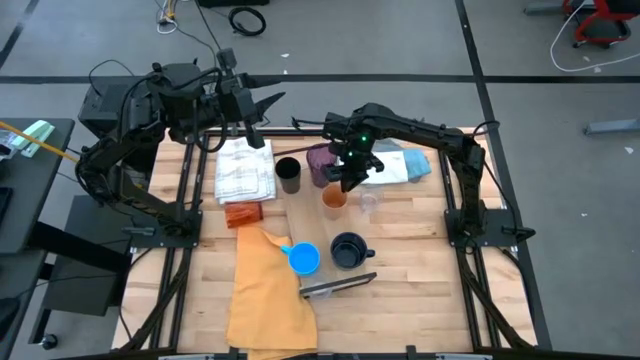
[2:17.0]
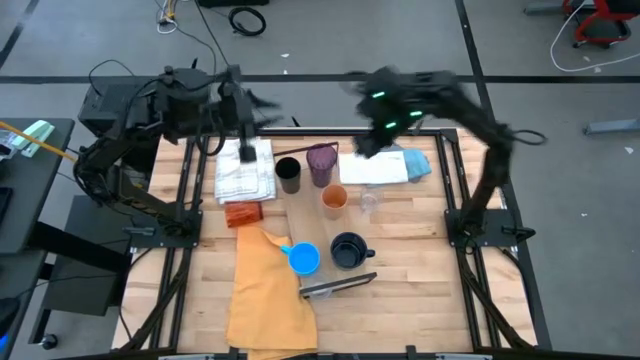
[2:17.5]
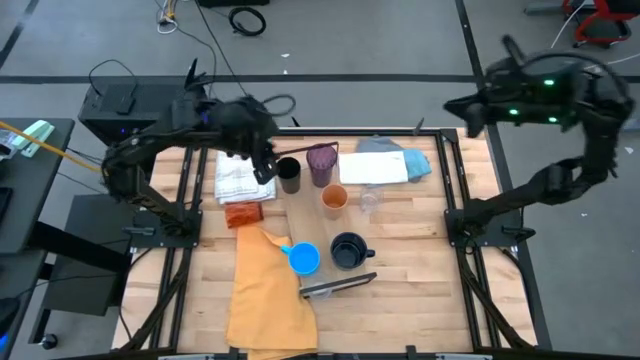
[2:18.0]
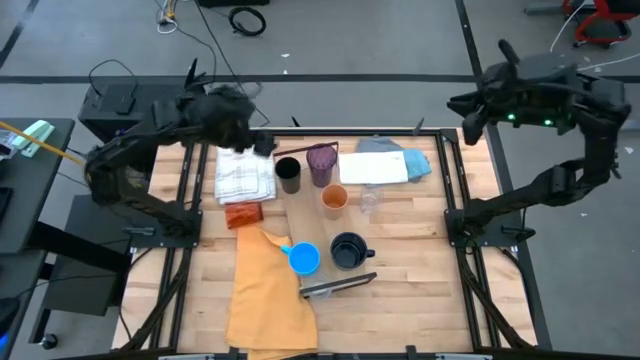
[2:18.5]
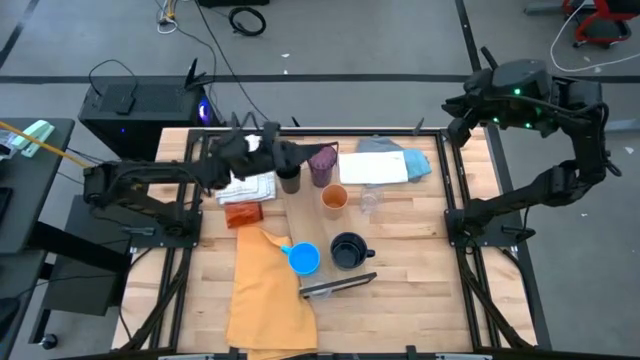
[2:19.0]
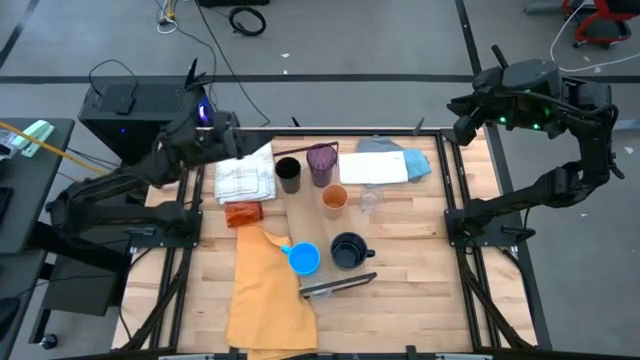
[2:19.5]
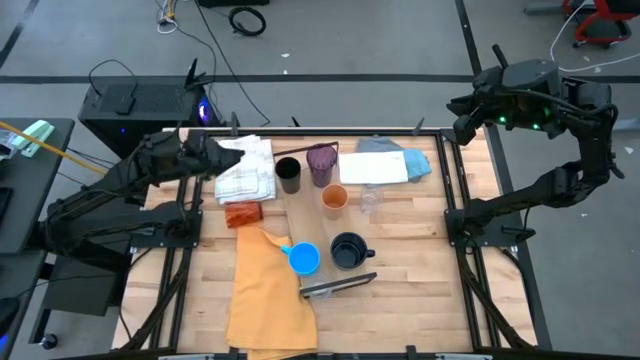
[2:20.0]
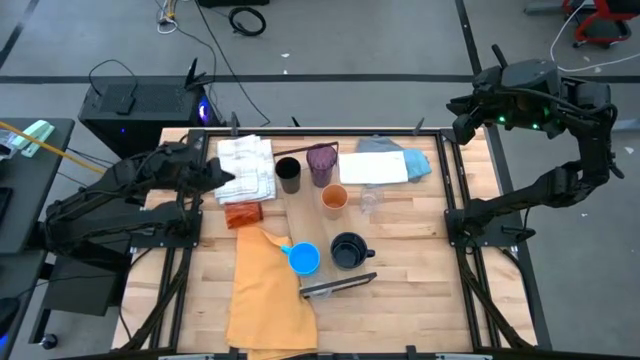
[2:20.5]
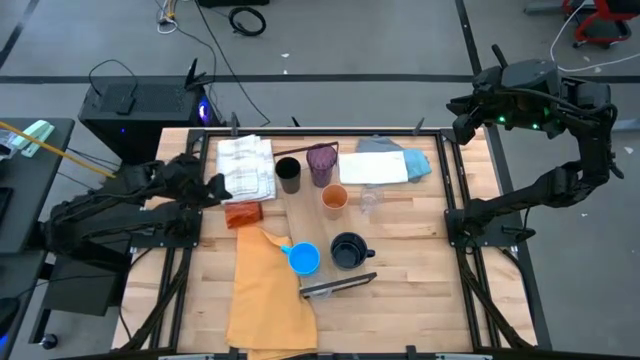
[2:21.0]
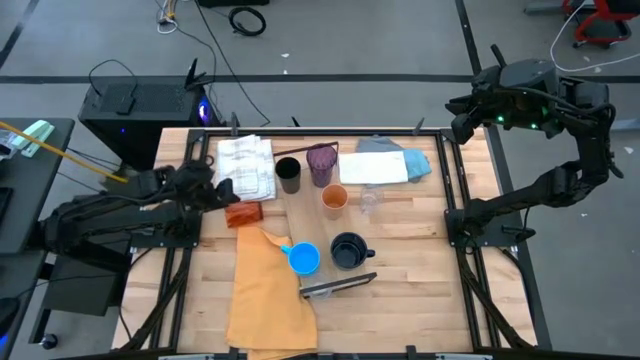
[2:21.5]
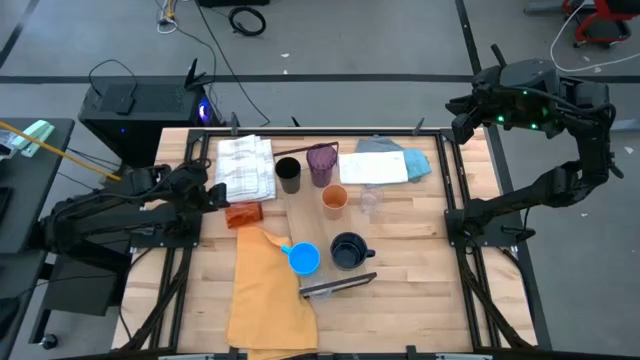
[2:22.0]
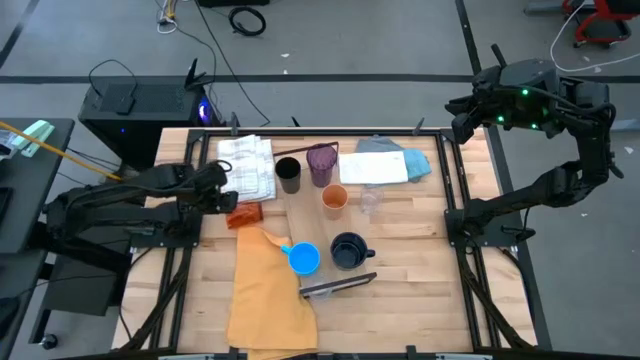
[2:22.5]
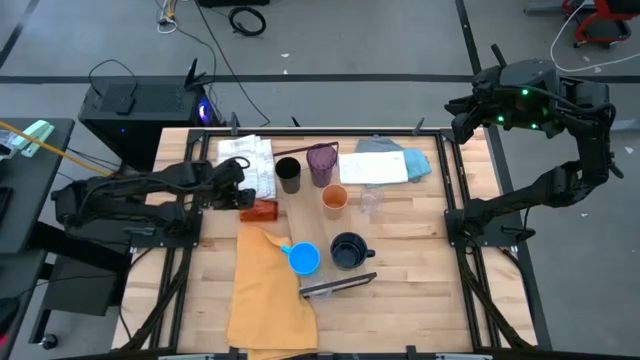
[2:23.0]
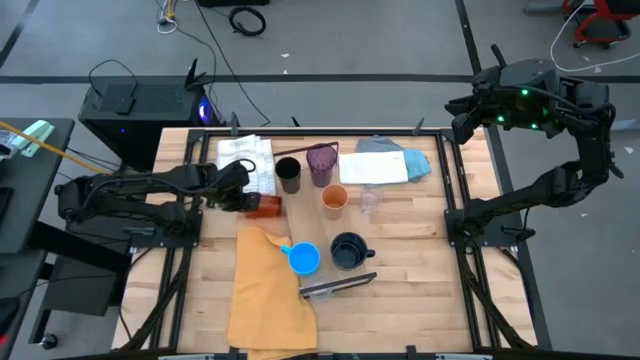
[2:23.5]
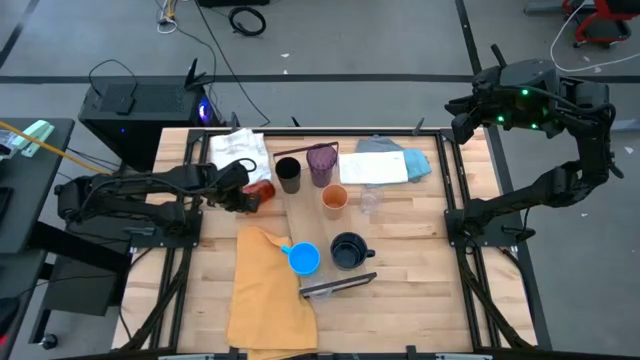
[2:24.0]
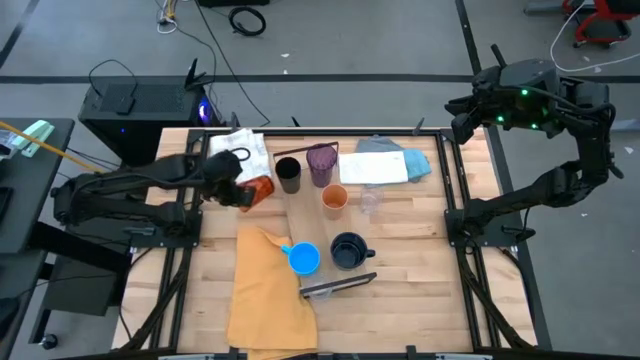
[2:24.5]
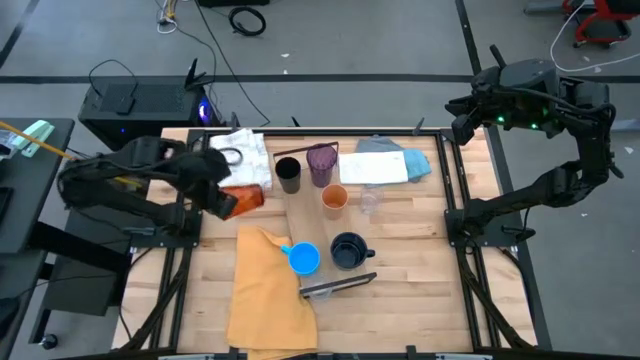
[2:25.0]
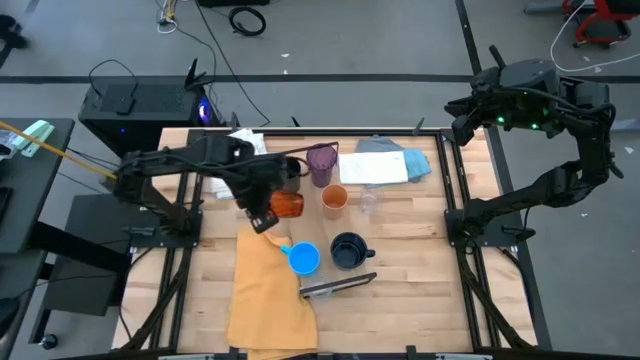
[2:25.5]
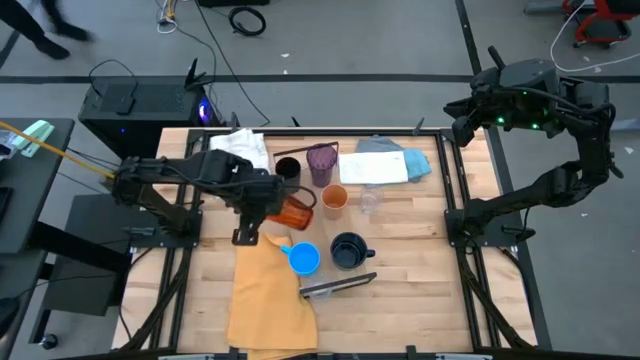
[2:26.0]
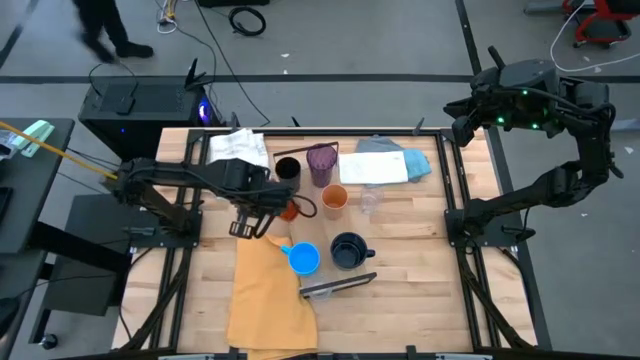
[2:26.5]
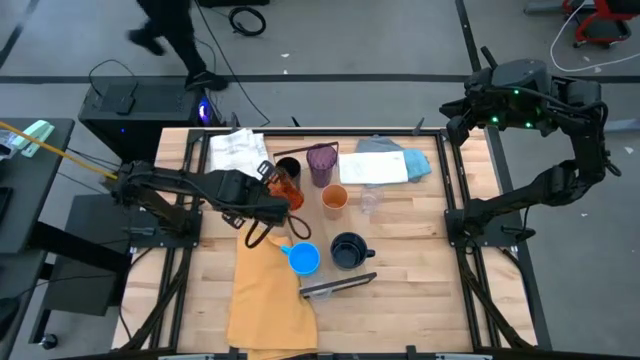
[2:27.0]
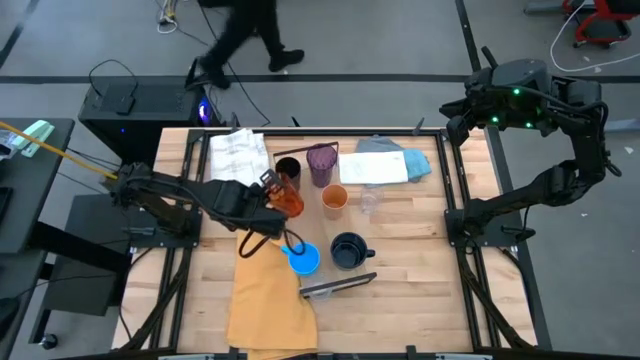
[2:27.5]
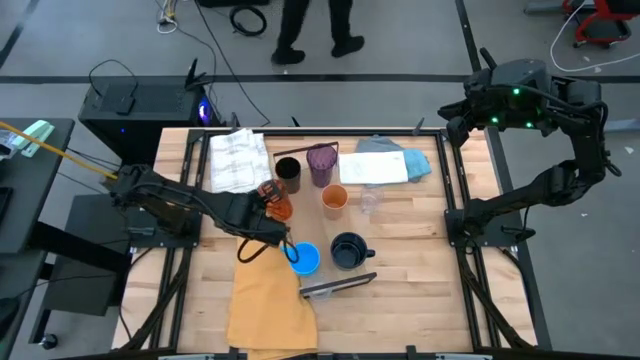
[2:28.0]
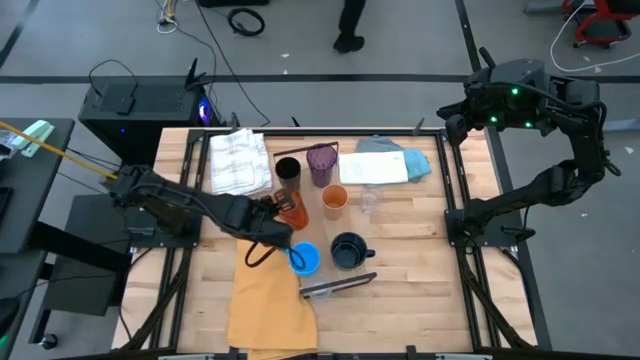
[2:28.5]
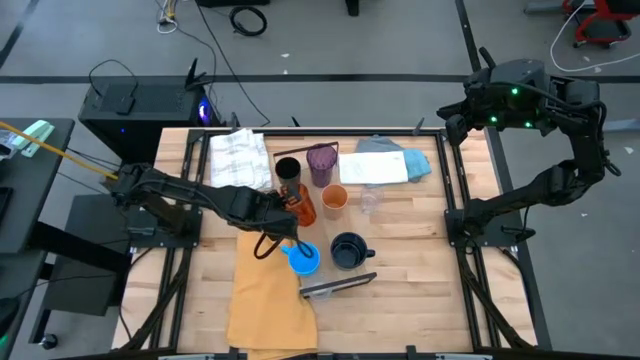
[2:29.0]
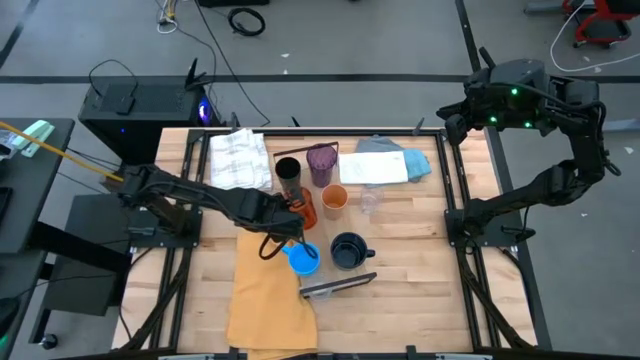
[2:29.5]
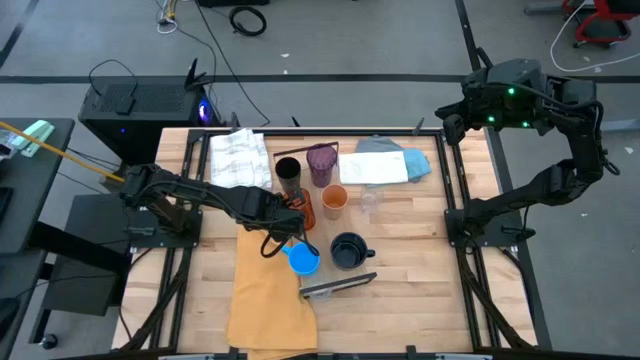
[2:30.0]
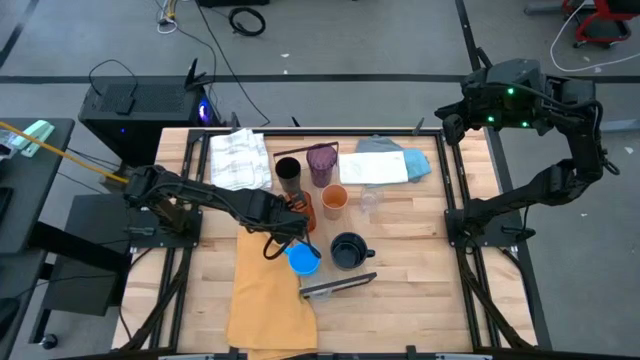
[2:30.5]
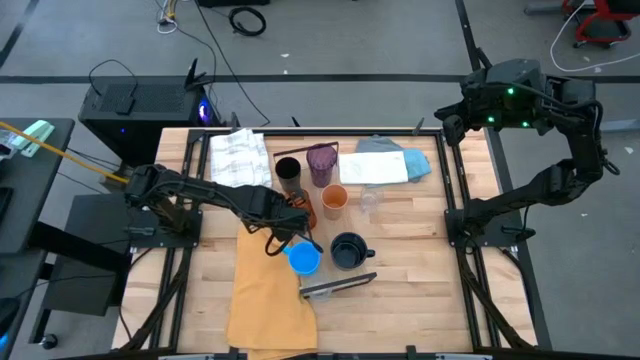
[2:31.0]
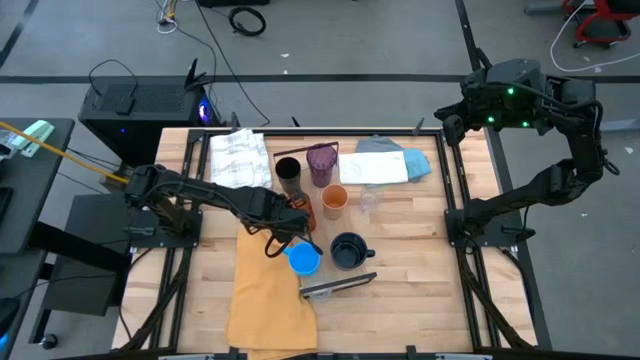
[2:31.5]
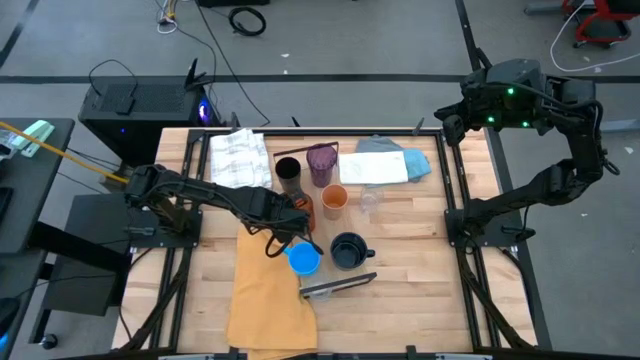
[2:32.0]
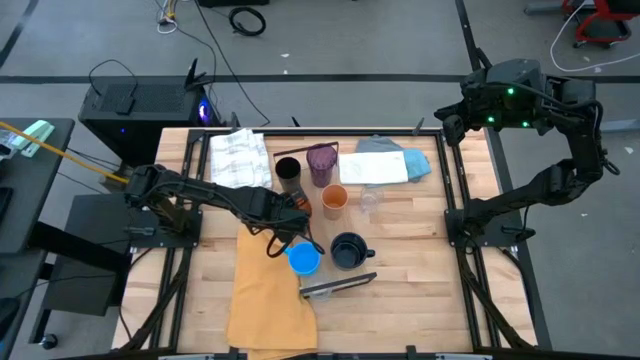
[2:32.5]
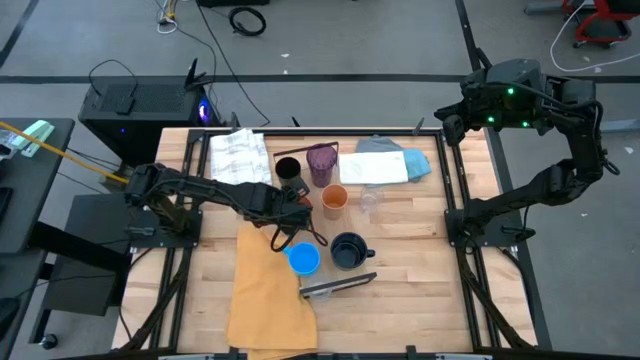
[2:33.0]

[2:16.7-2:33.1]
Task: Stack small to large cups/mugs on shelf
Put the brown cup on the shelf

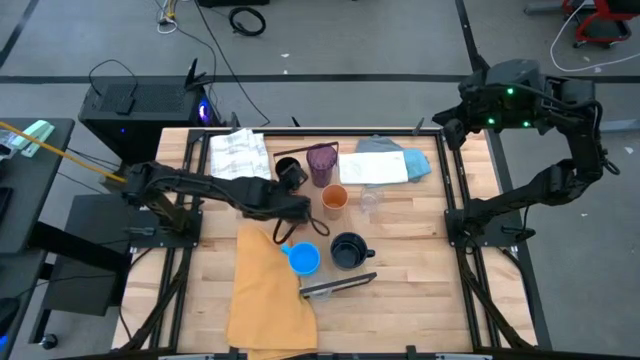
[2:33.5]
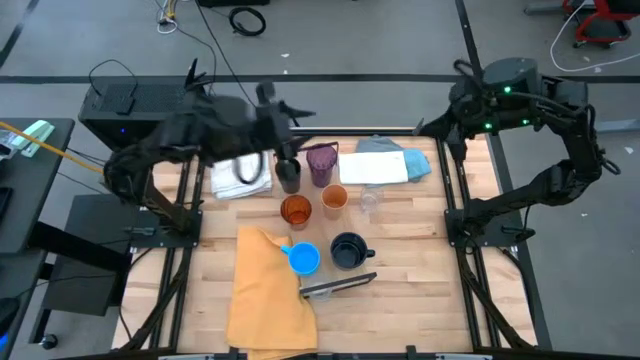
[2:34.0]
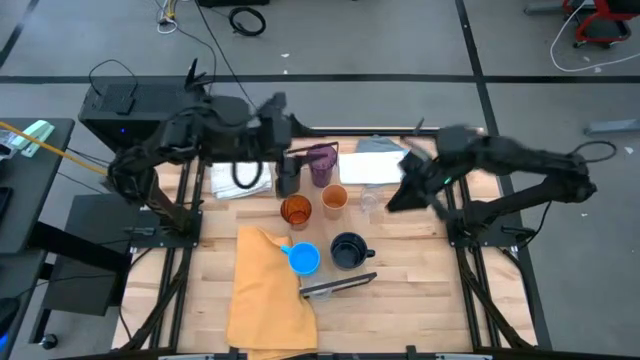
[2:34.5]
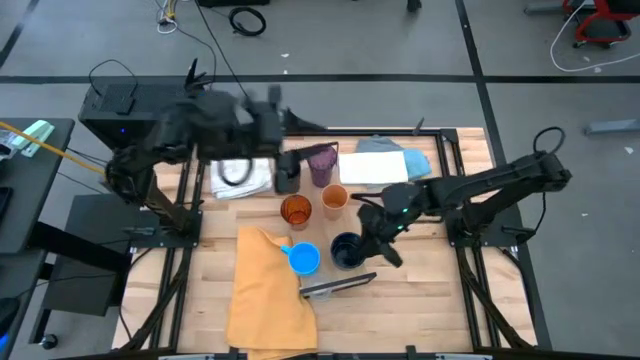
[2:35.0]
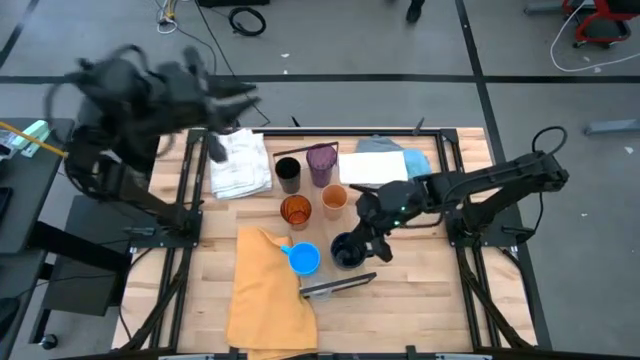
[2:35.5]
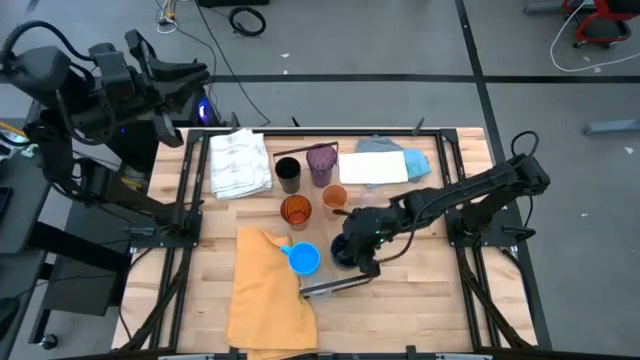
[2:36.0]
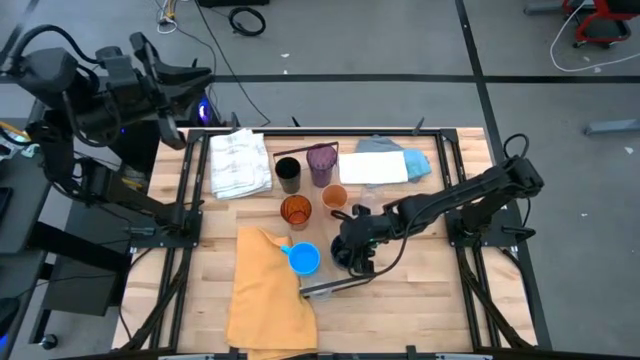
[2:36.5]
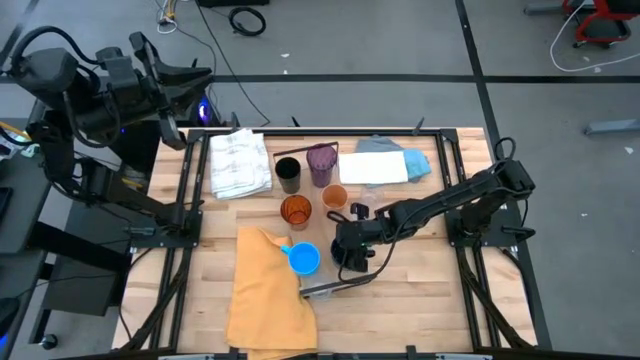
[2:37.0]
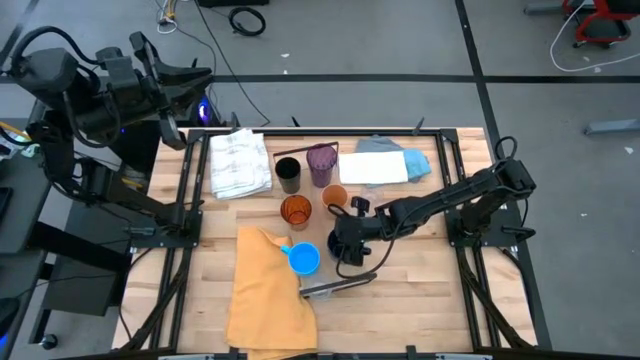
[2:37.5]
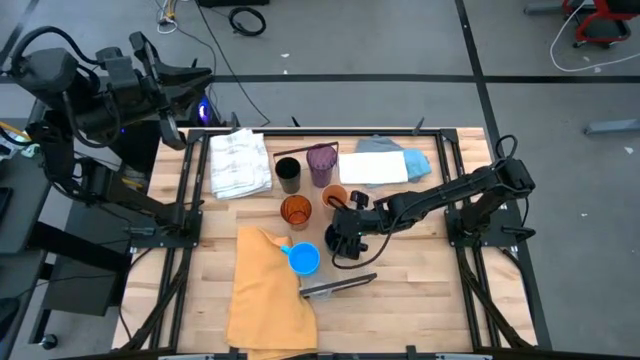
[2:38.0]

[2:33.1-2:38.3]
Adjust the dark blue mug on the shelf
